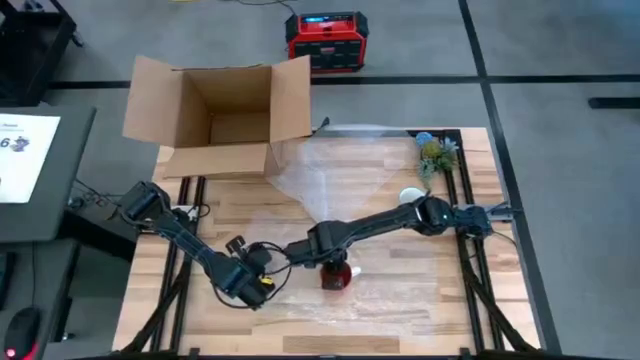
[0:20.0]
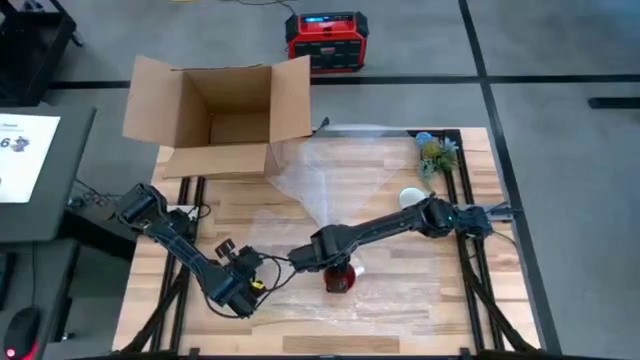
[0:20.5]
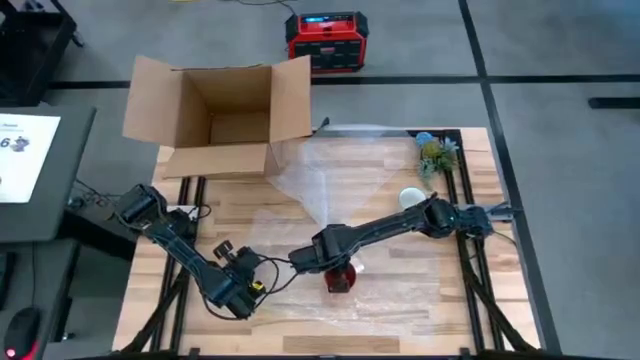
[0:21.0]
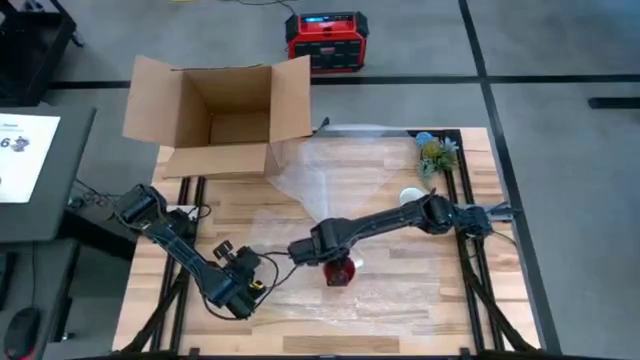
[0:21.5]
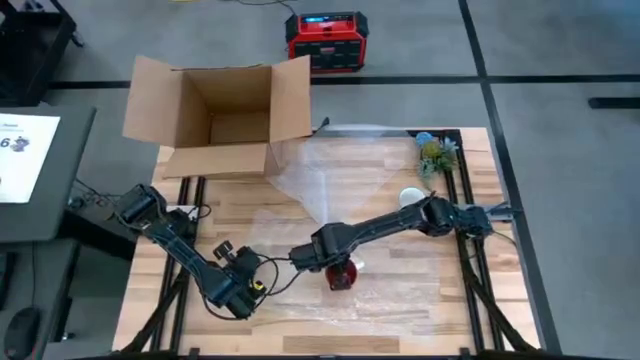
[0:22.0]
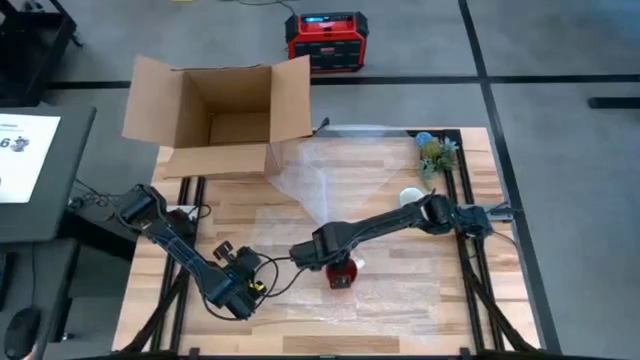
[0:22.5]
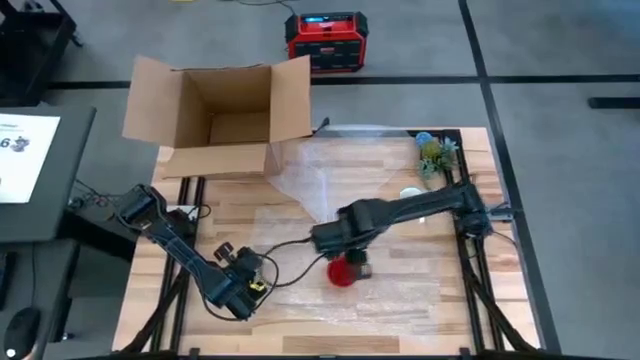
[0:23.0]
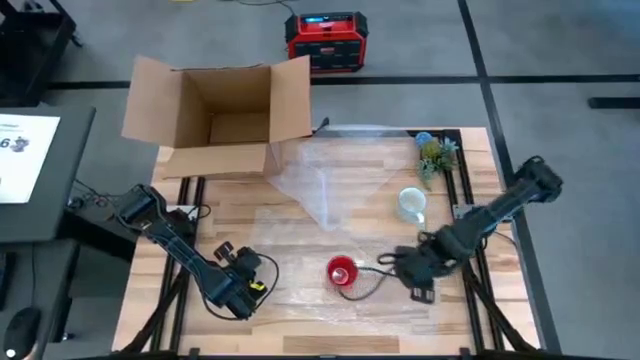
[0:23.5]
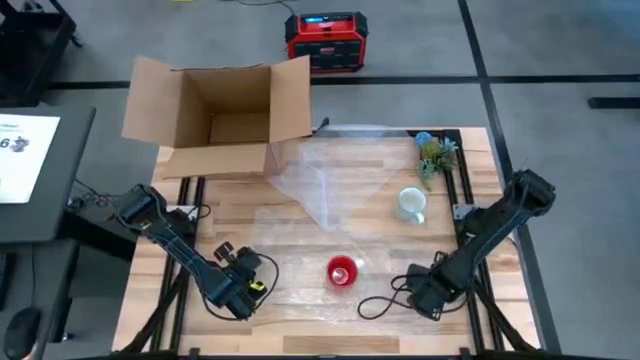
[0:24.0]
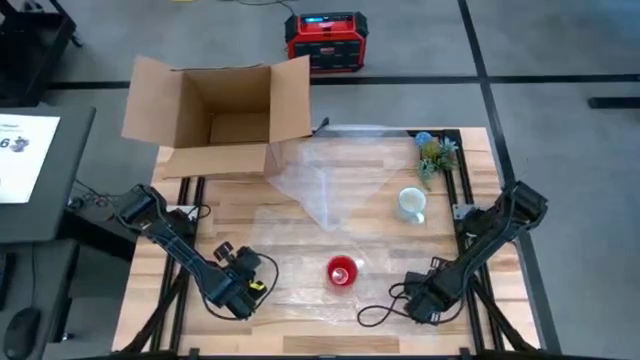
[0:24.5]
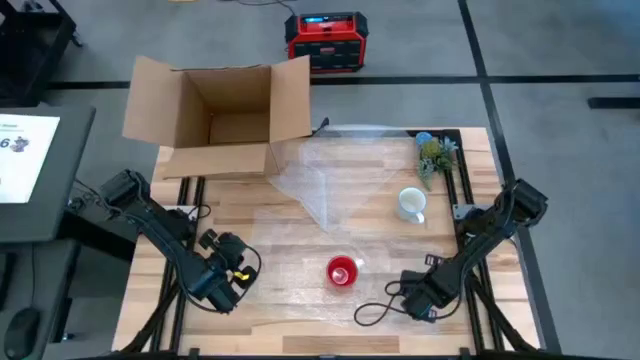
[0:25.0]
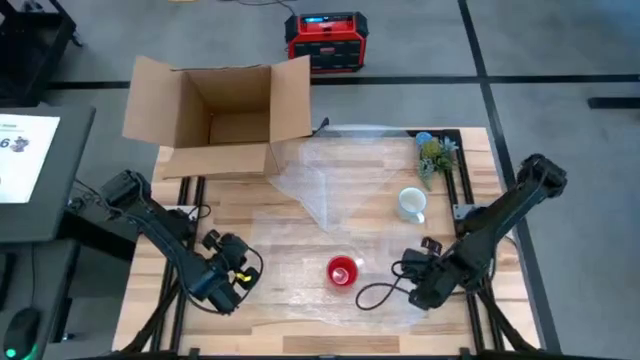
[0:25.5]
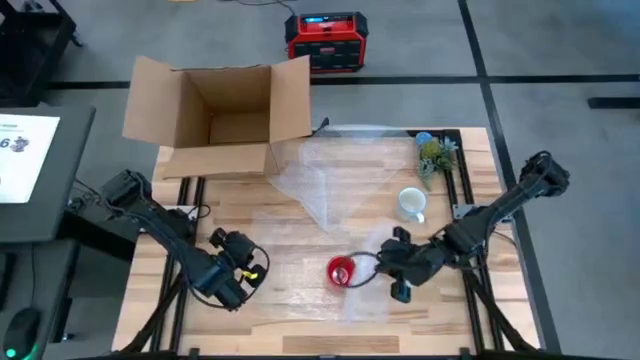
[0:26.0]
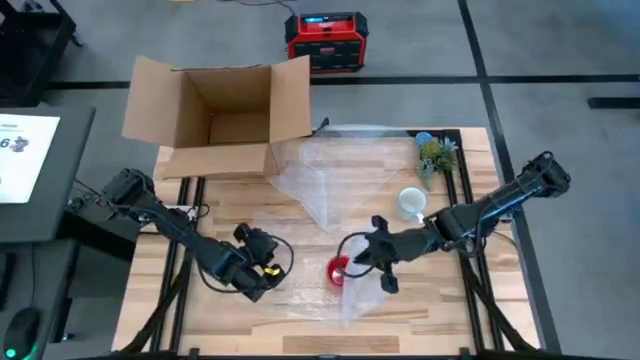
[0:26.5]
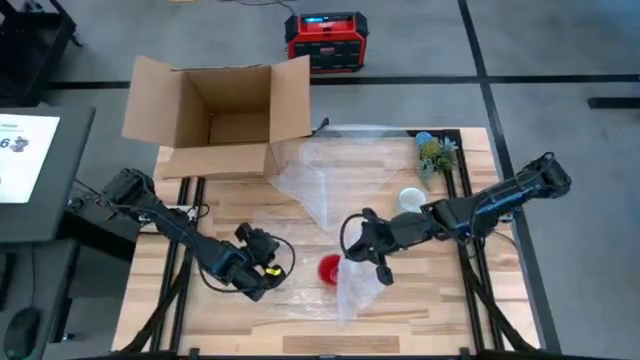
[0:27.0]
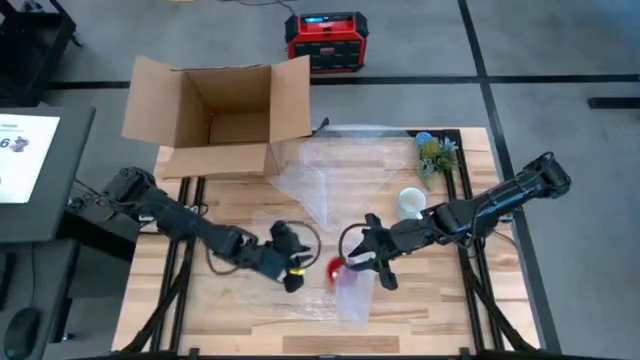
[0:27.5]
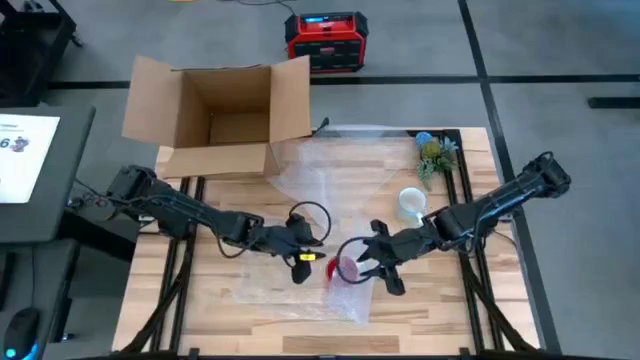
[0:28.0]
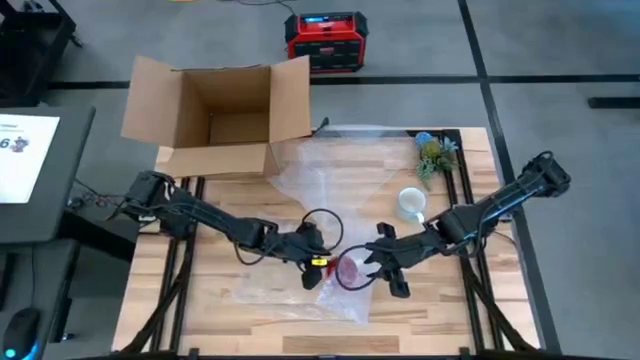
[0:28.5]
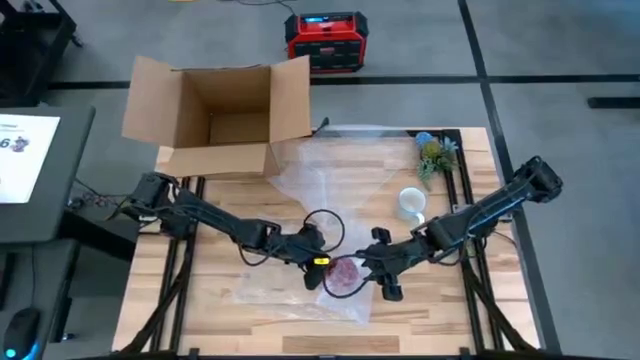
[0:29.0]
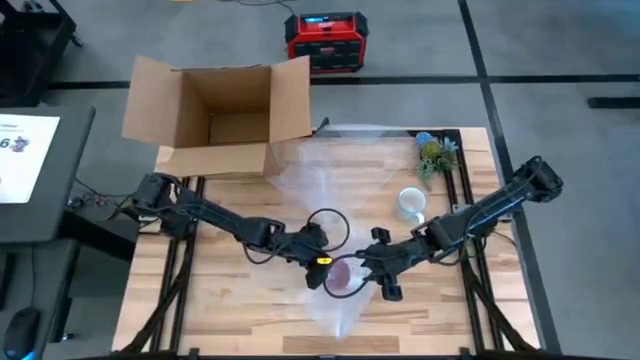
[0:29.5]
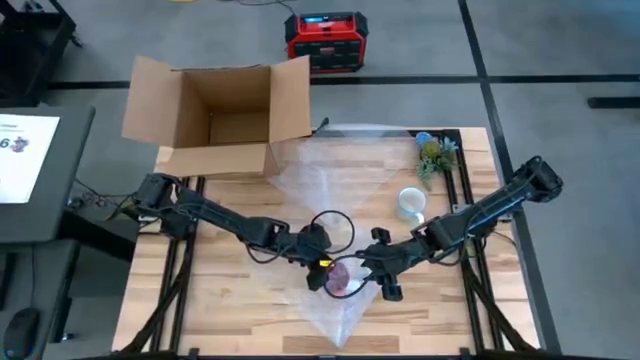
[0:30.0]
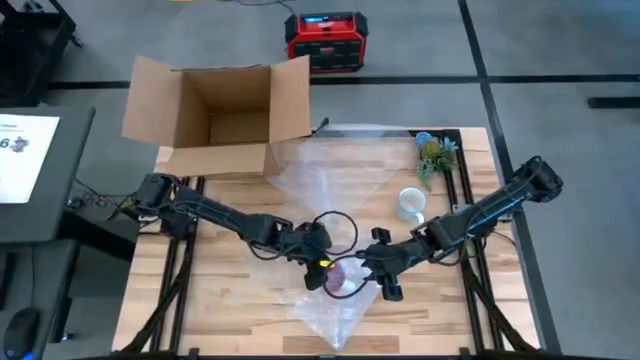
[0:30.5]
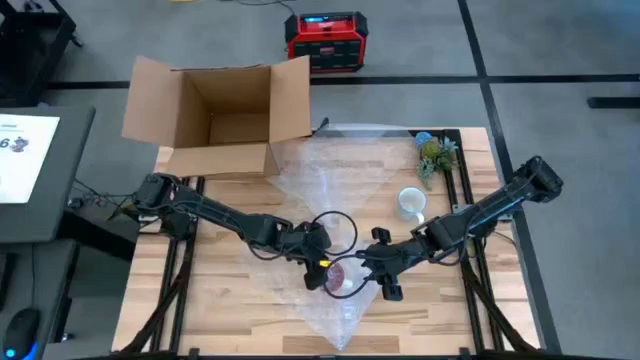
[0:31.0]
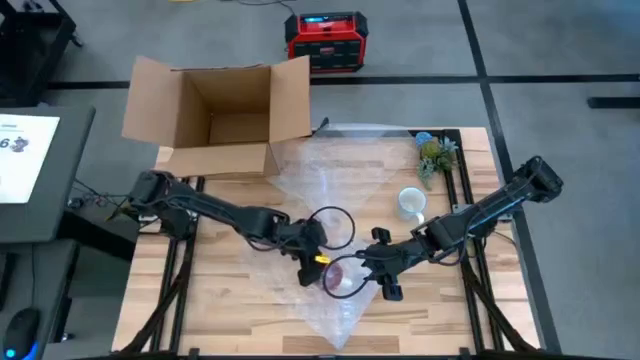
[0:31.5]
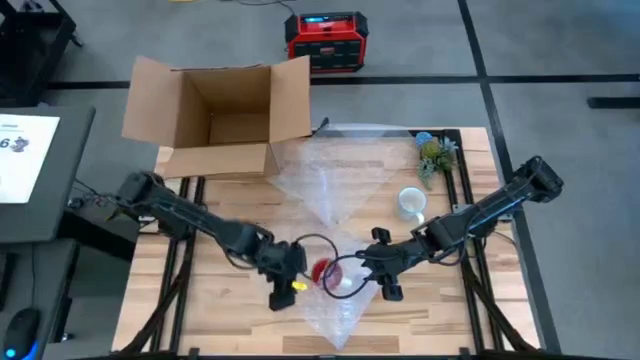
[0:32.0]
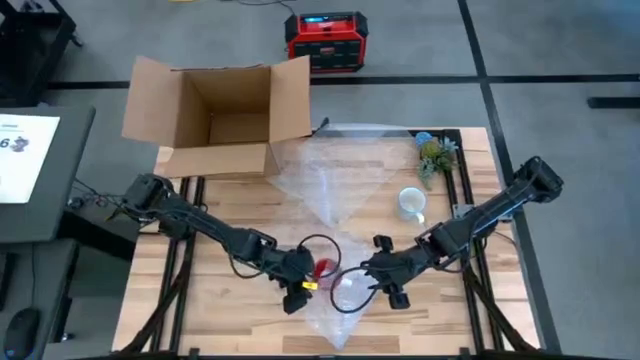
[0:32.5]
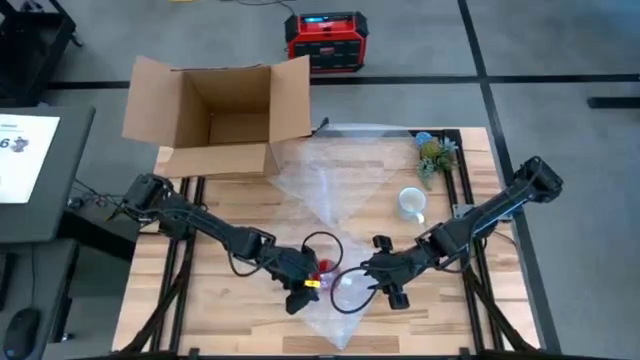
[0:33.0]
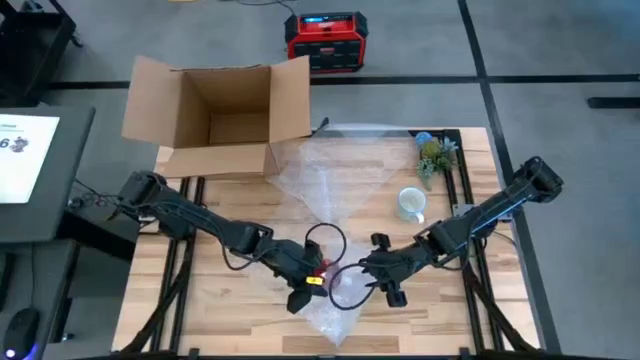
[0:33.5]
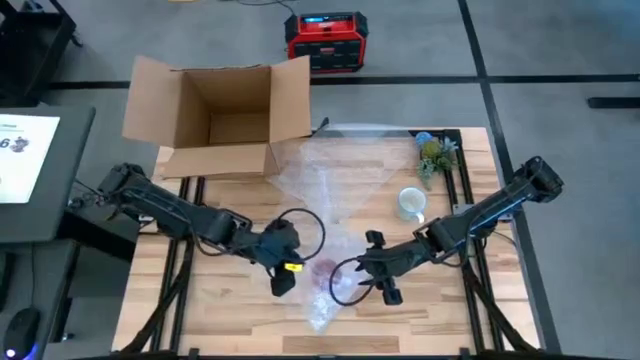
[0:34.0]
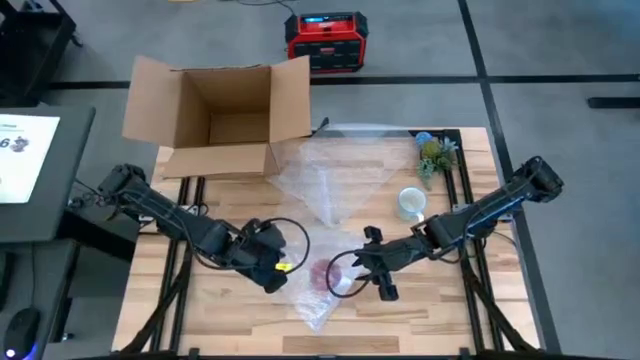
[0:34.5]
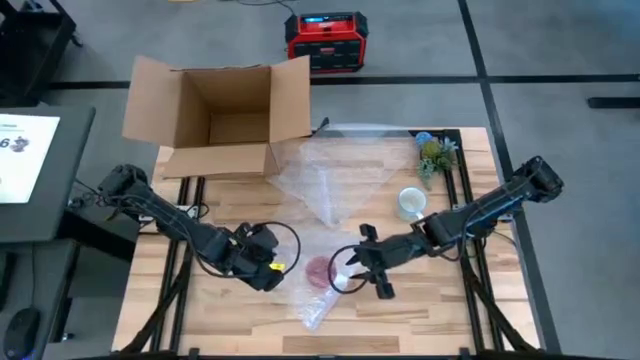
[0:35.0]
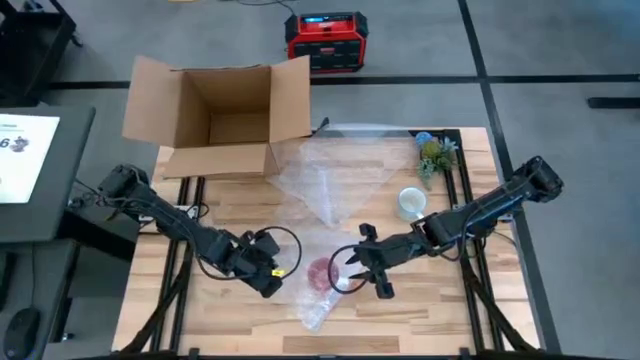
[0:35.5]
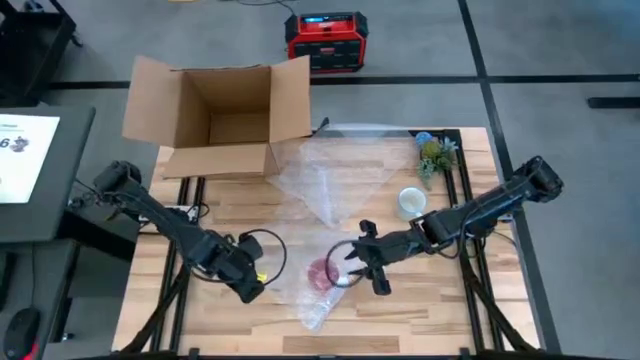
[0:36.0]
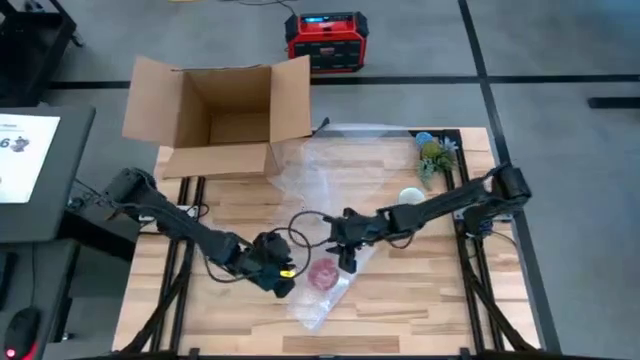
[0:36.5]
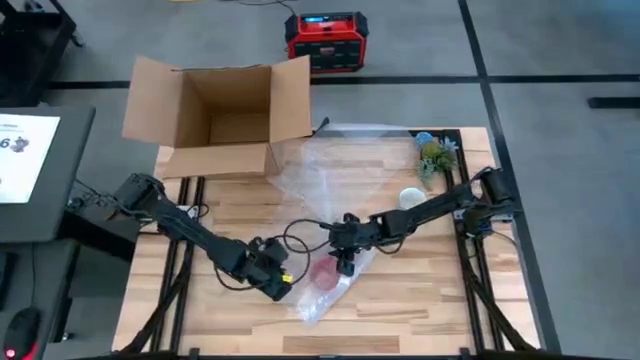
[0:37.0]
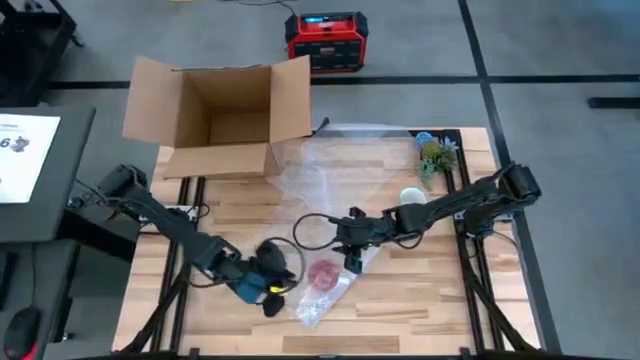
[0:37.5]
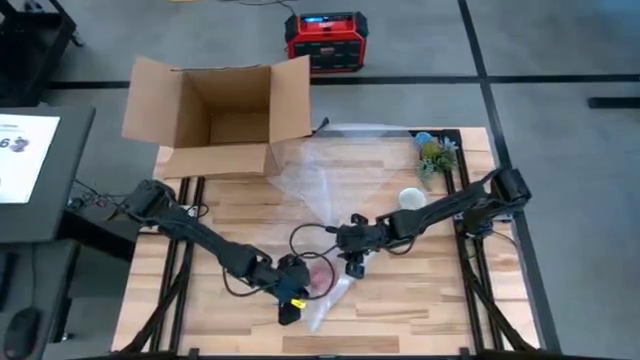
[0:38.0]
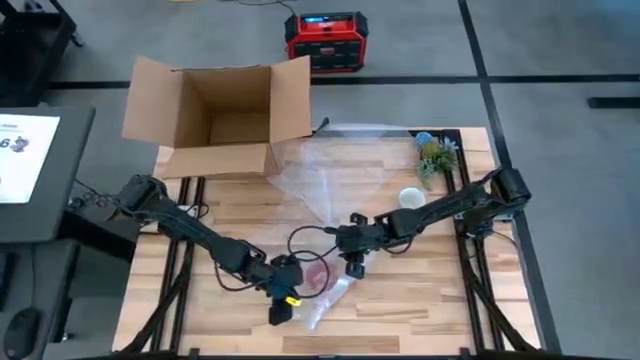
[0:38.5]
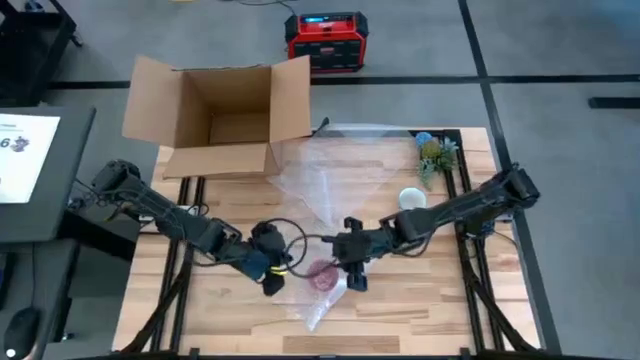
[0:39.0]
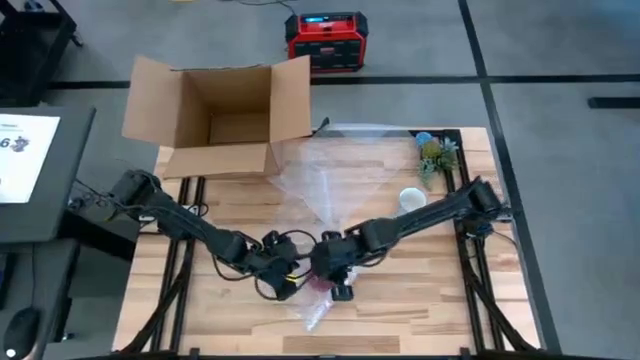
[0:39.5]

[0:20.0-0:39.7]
Task: wrap mug
Wrap the red mug with bubble wrap

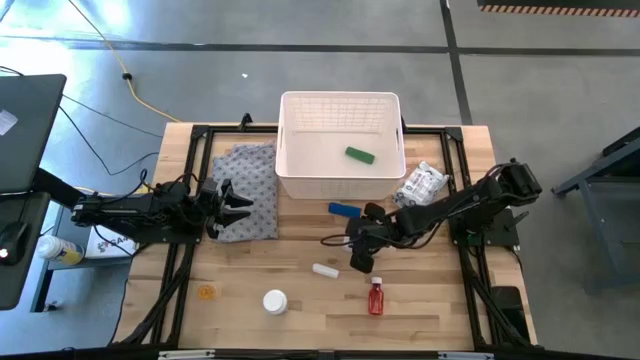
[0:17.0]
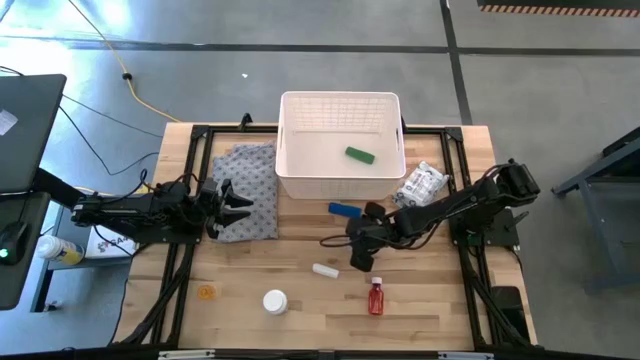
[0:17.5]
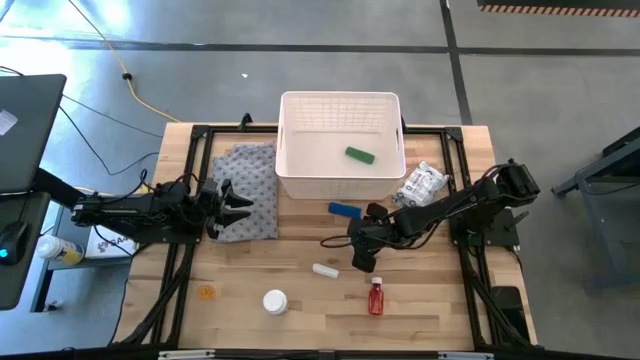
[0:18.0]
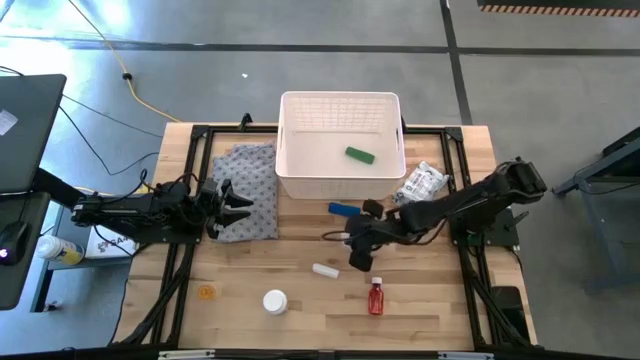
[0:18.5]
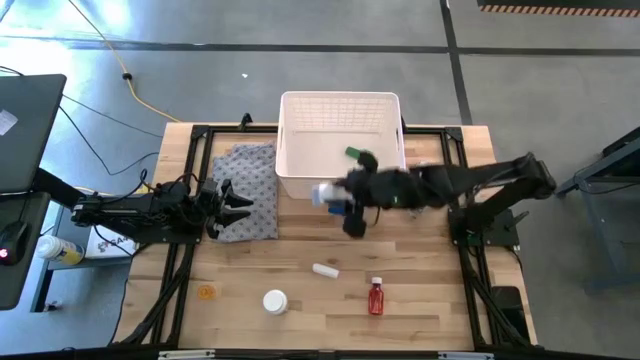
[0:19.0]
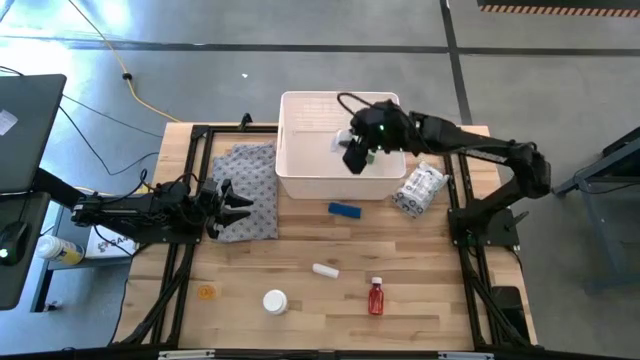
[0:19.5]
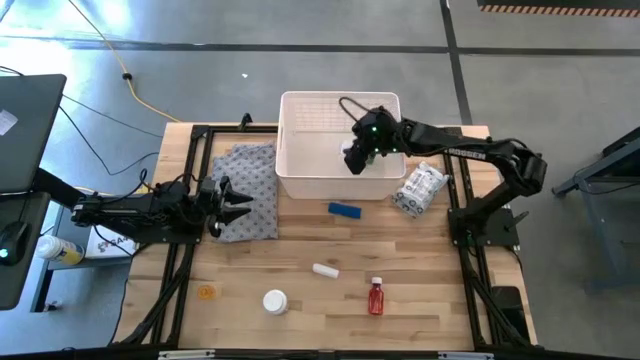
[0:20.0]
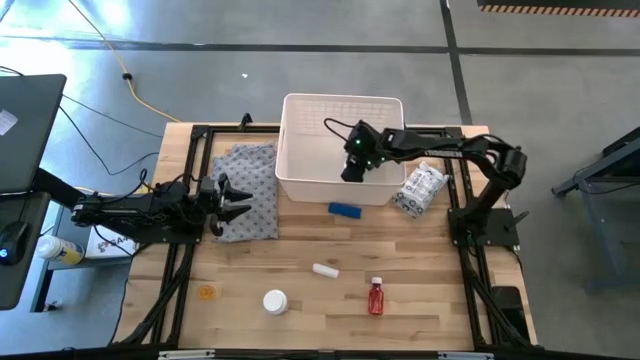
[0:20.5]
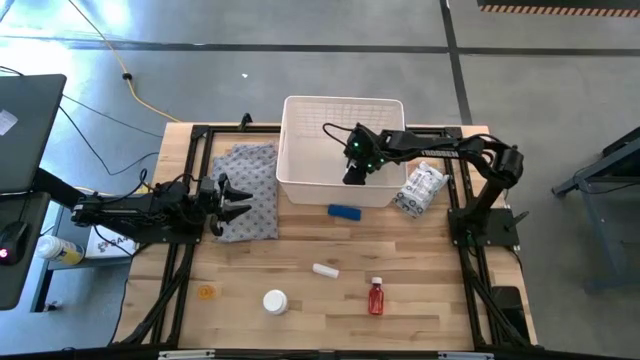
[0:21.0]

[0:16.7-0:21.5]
Task: Pick & place medical supplies in basket/bin
Put the small white pill bottle into the white bin
